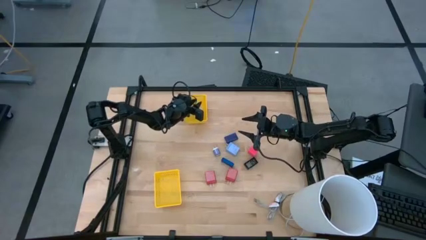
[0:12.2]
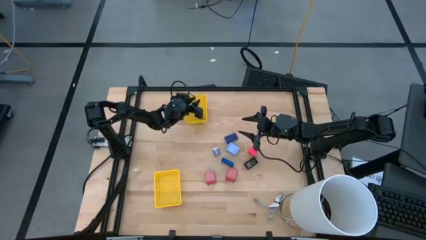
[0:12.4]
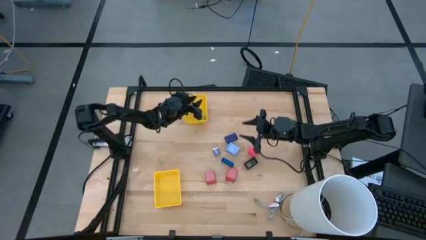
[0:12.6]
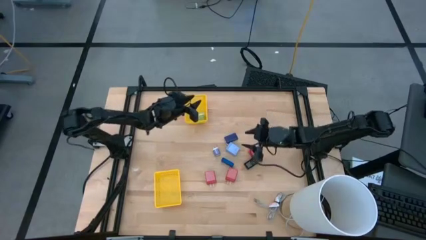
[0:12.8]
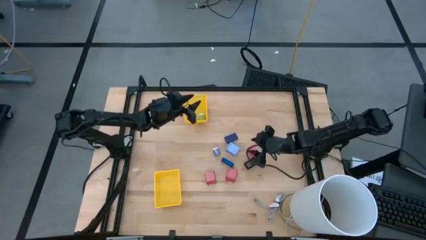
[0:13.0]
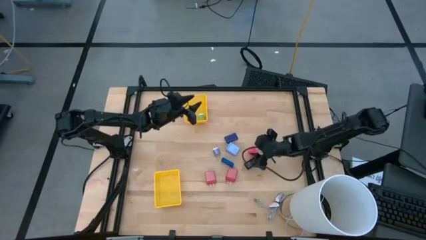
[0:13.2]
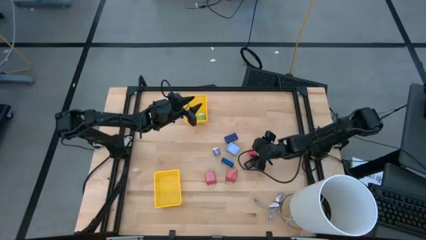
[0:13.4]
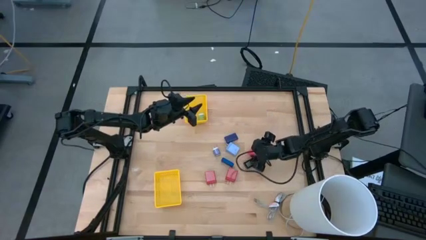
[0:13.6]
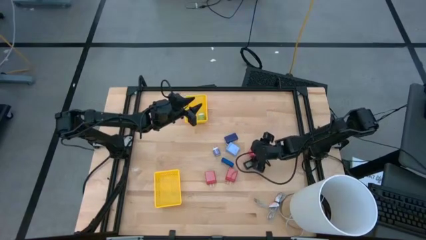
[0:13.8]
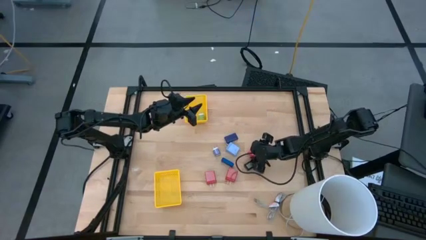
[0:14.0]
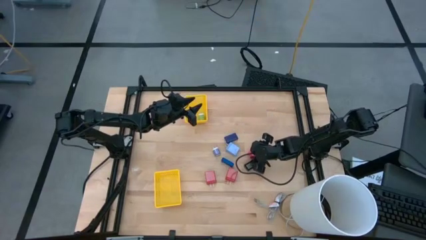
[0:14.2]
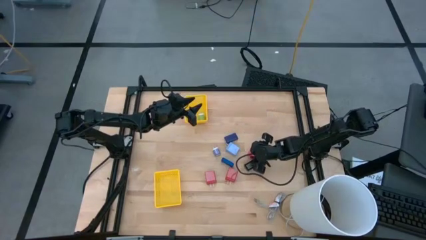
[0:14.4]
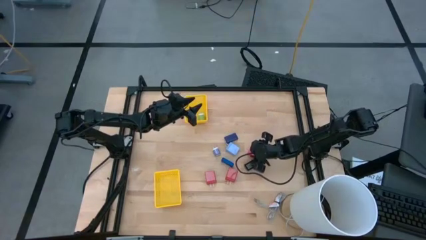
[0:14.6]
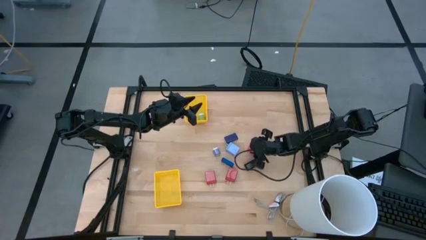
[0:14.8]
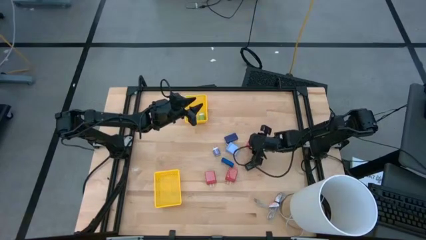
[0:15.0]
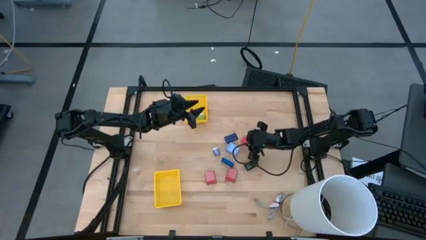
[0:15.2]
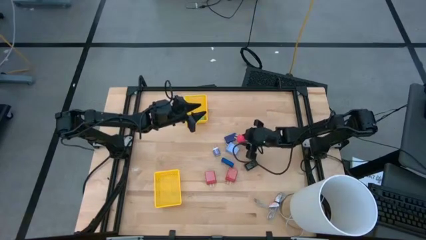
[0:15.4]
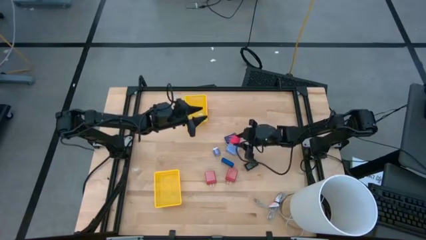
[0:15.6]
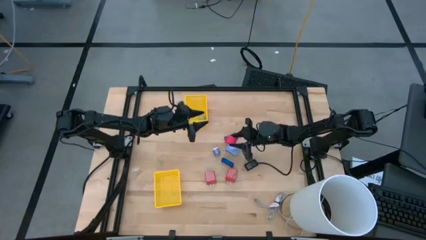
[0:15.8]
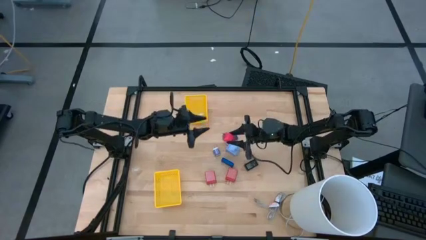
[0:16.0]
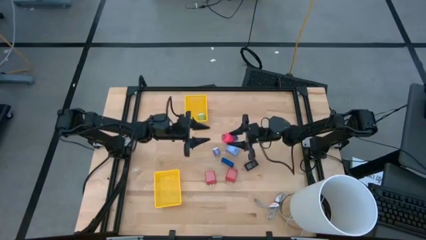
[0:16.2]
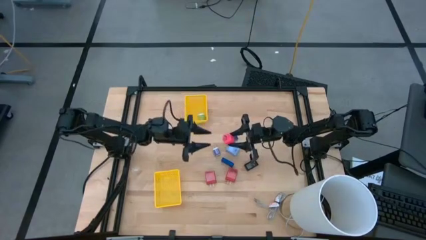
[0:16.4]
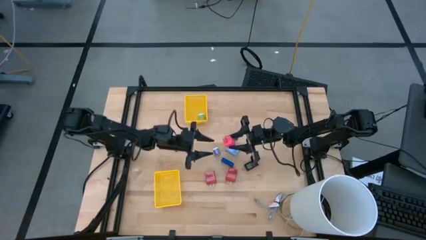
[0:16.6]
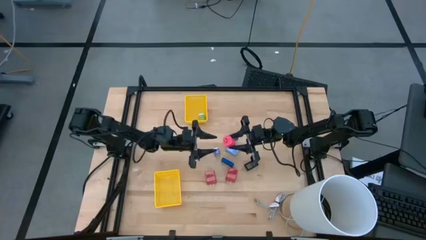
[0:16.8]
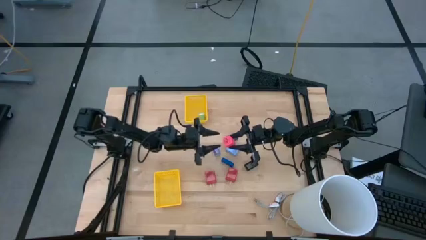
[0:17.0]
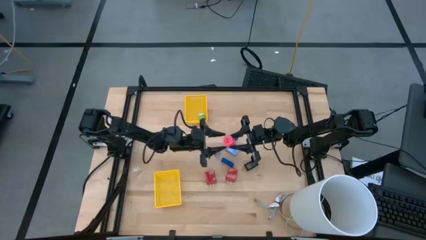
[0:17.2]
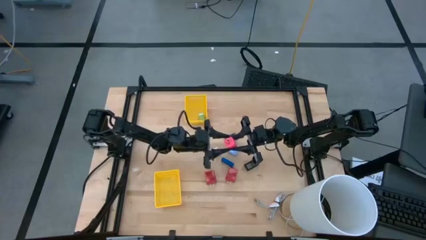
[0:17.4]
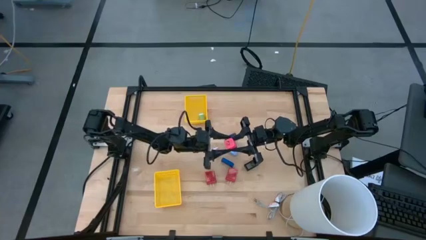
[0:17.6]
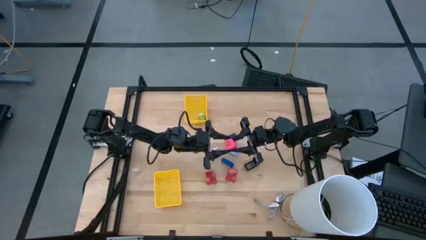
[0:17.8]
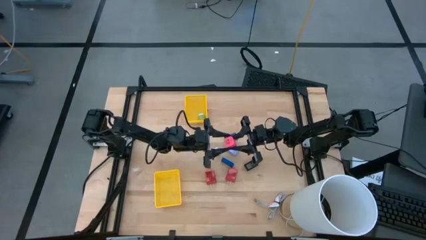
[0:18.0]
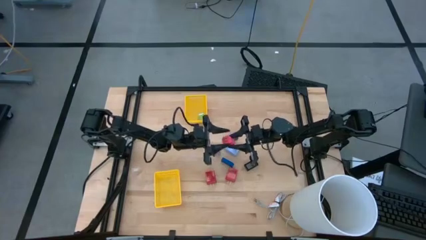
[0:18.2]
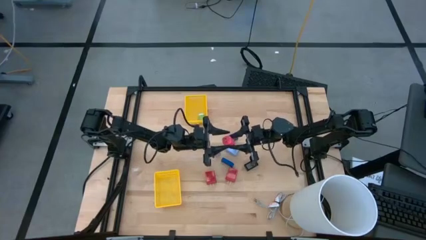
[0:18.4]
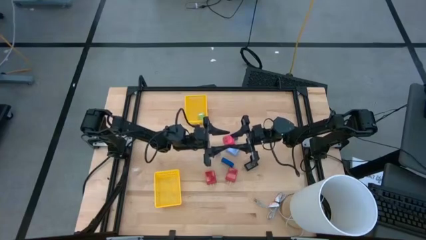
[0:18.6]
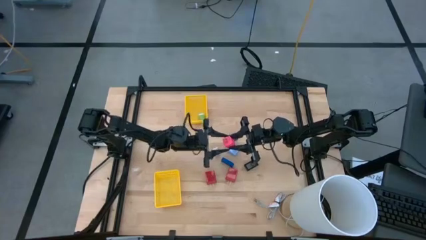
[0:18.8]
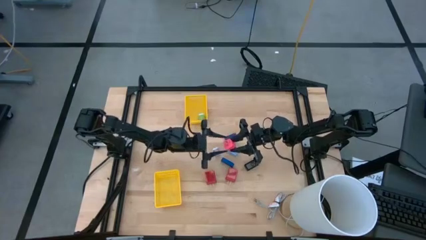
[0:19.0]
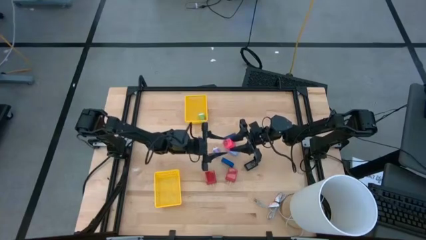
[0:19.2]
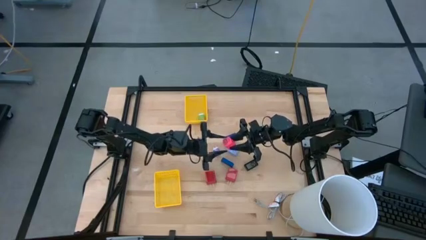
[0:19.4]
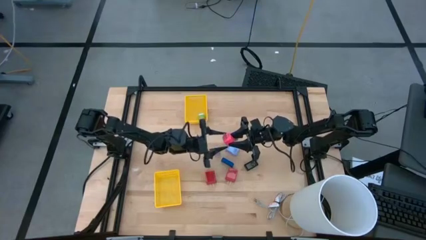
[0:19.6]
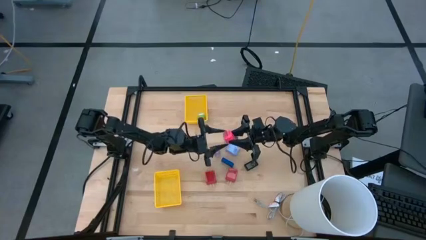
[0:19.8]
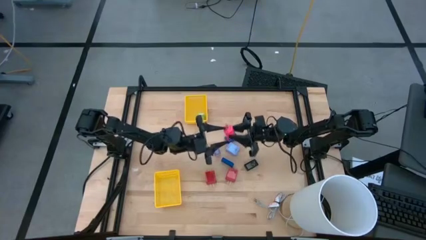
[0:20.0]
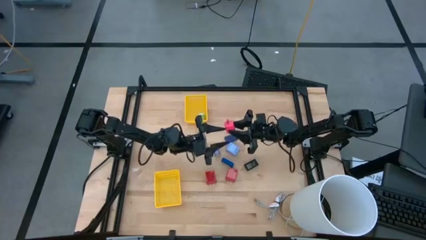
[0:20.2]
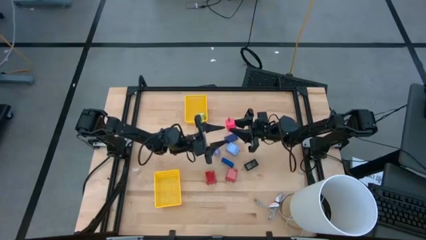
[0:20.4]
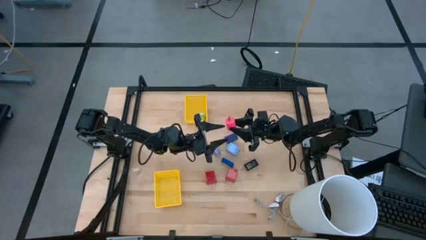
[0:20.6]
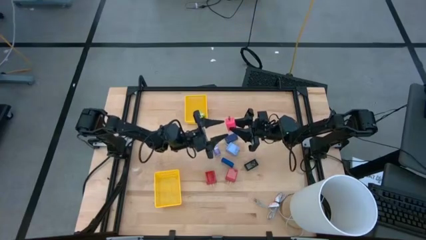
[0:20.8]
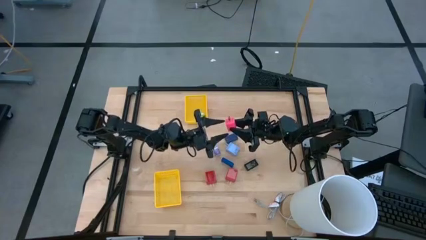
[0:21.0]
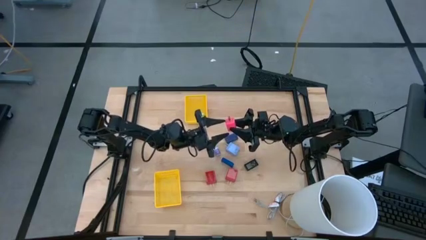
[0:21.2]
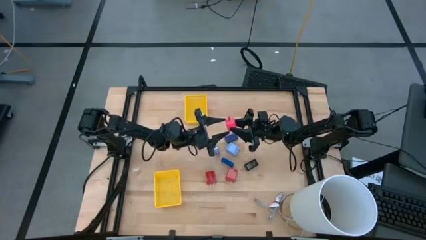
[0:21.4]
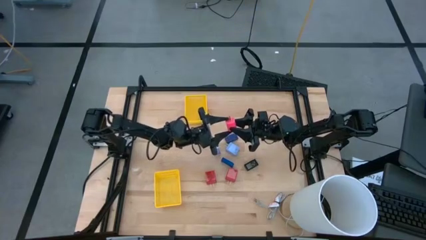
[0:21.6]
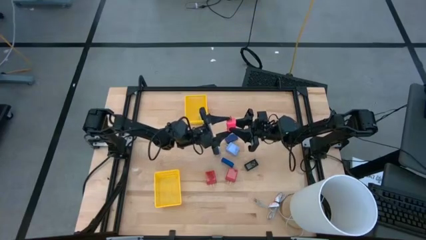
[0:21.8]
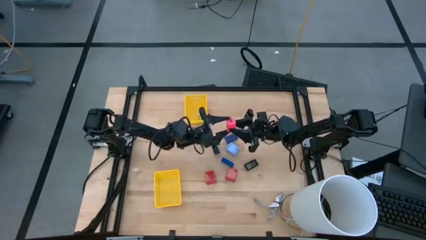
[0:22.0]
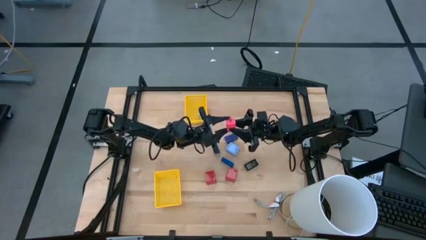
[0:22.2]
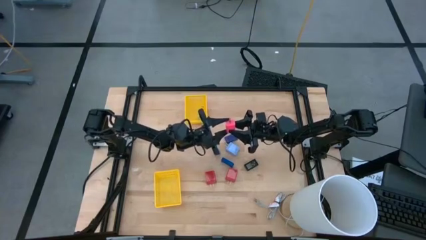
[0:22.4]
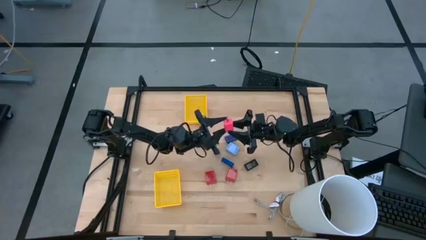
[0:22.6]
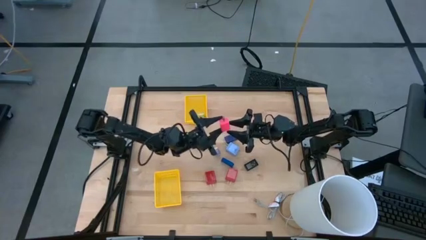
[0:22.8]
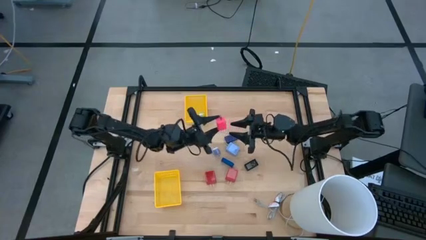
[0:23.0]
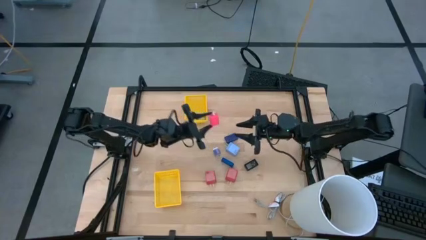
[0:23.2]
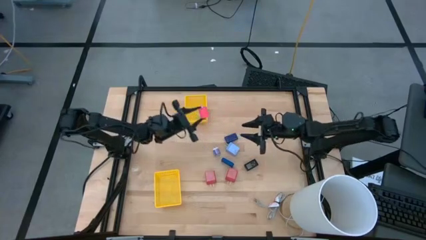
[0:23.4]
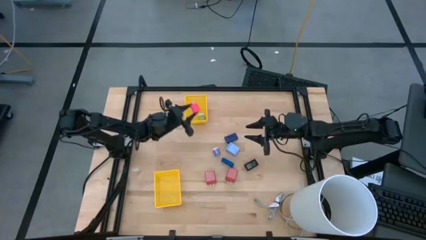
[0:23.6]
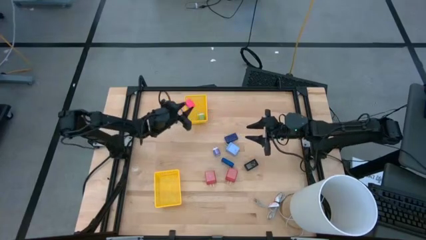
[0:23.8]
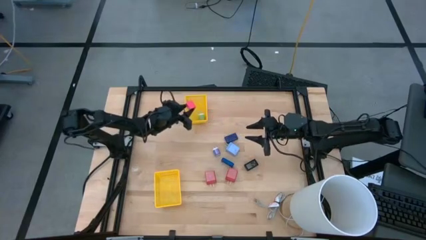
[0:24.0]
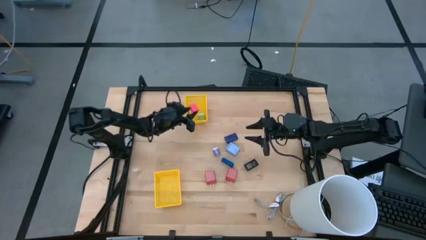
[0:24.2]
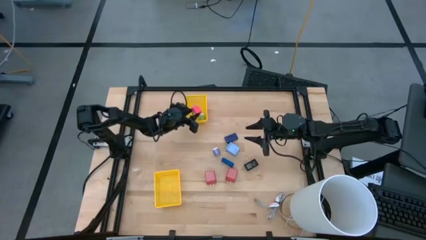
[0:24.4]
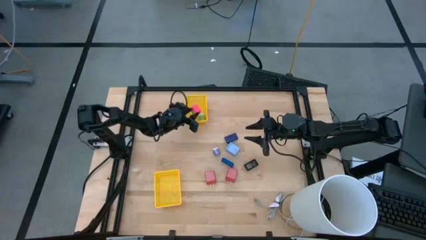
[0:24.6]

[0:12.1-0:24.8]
Task: Pick & Place Office items
Put the pink charger adapter into the top yellow bin
